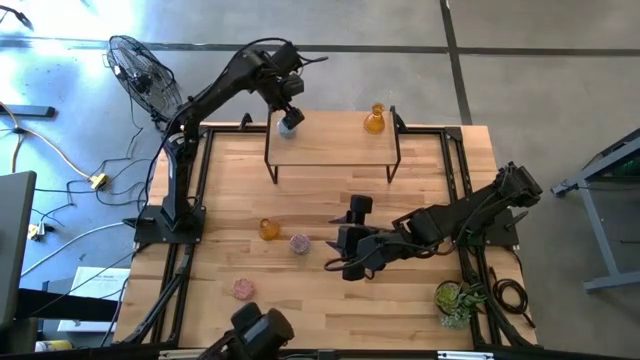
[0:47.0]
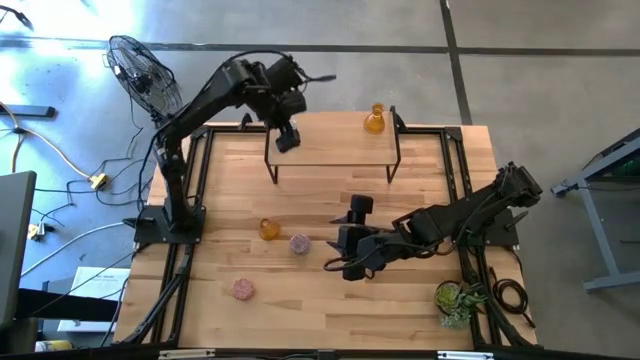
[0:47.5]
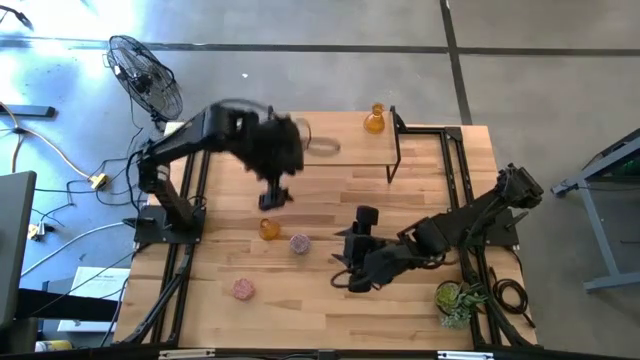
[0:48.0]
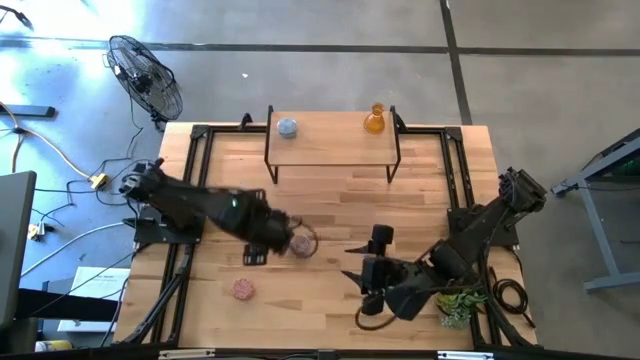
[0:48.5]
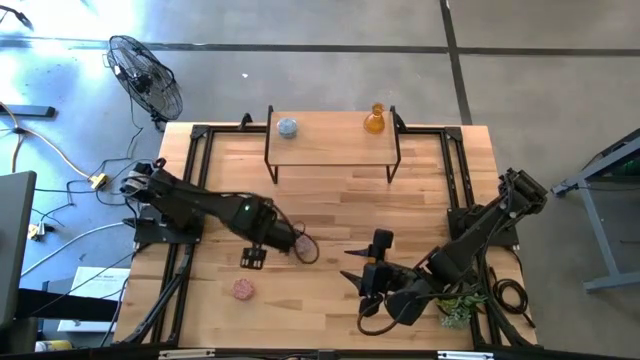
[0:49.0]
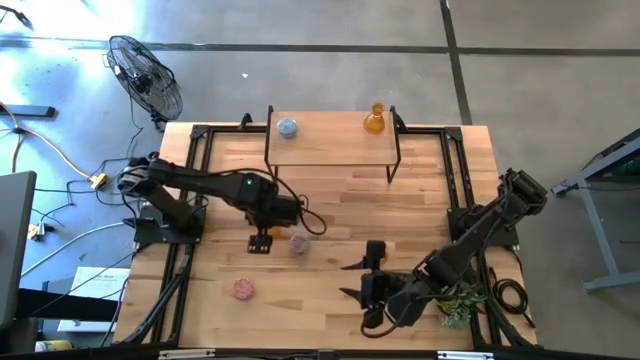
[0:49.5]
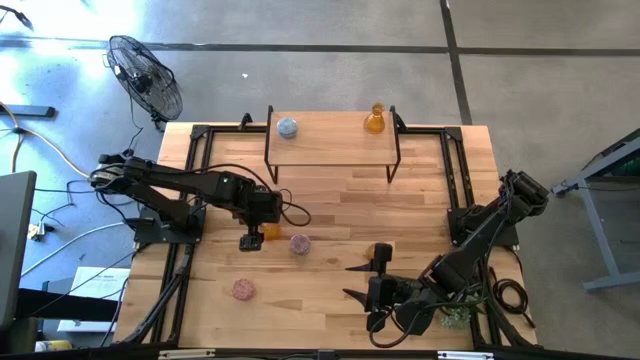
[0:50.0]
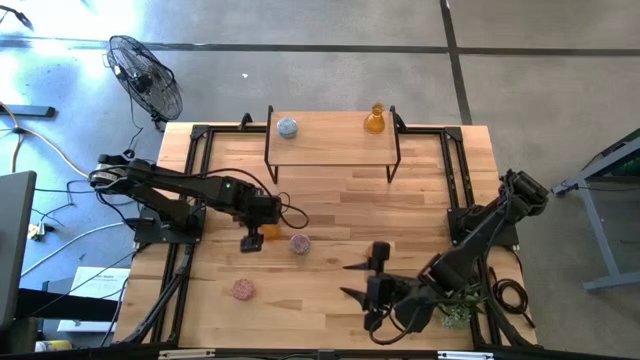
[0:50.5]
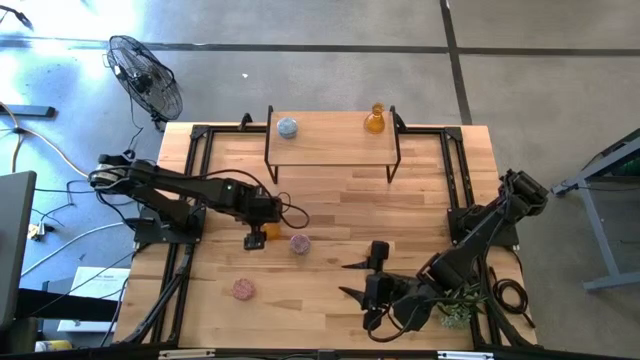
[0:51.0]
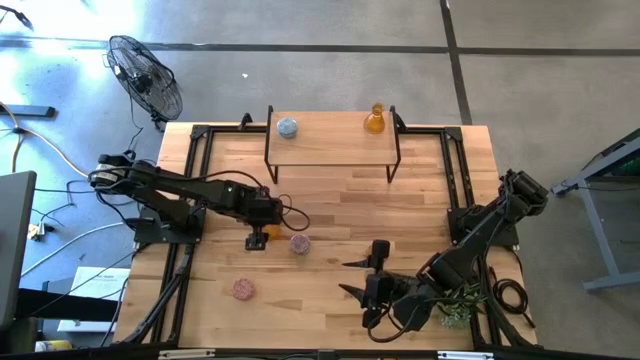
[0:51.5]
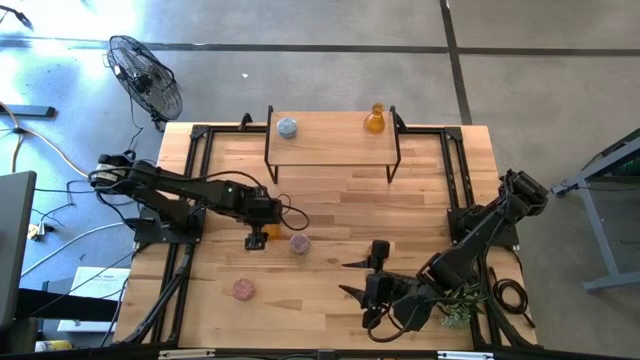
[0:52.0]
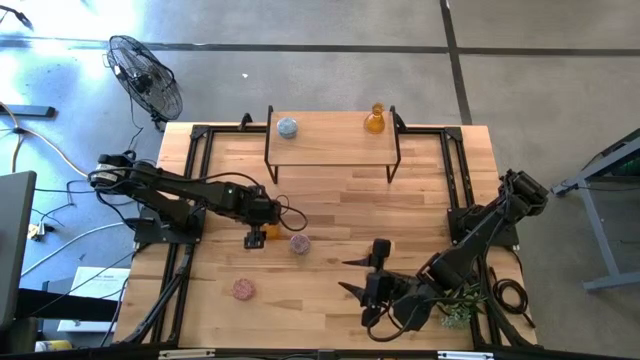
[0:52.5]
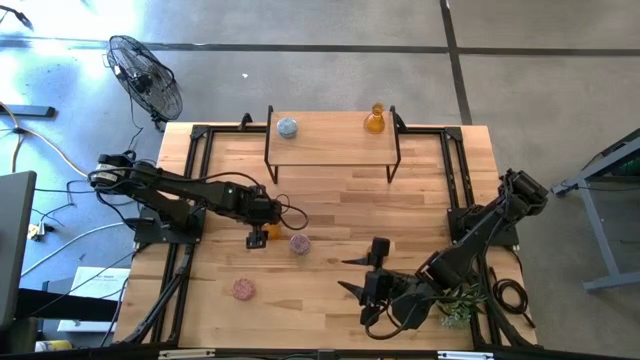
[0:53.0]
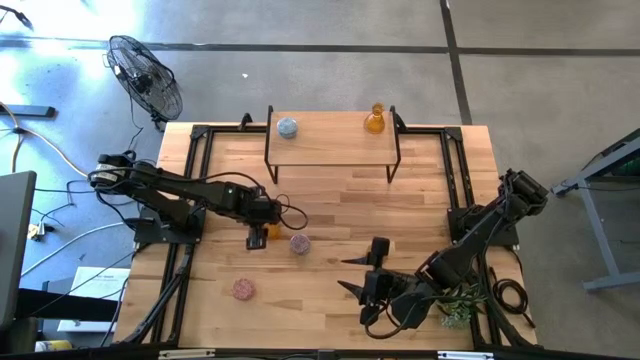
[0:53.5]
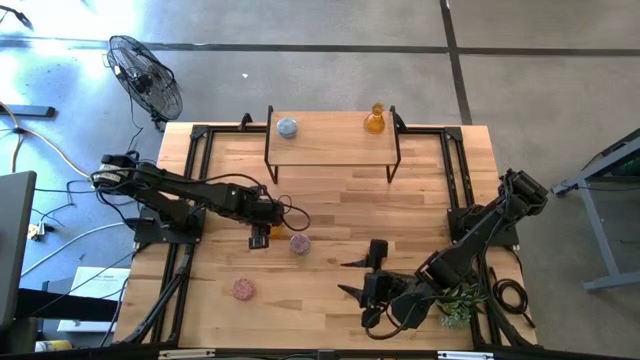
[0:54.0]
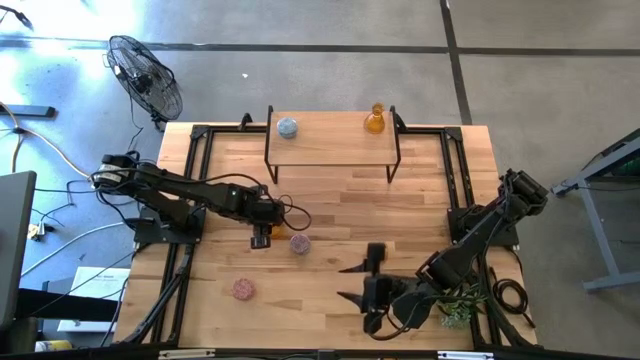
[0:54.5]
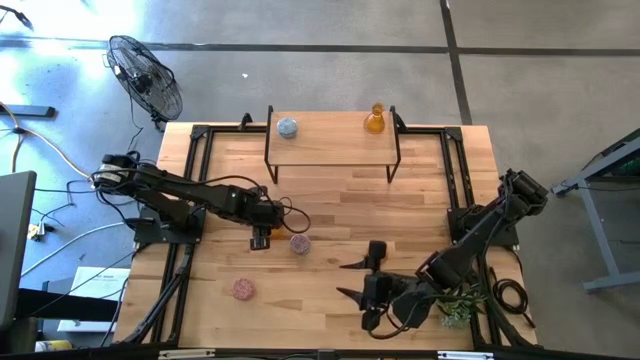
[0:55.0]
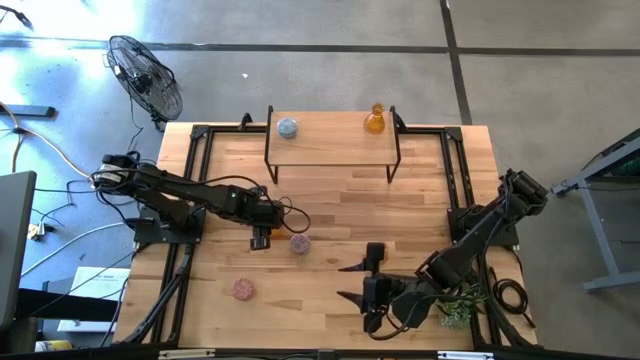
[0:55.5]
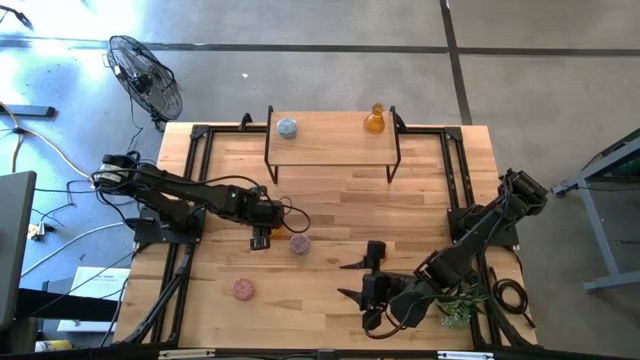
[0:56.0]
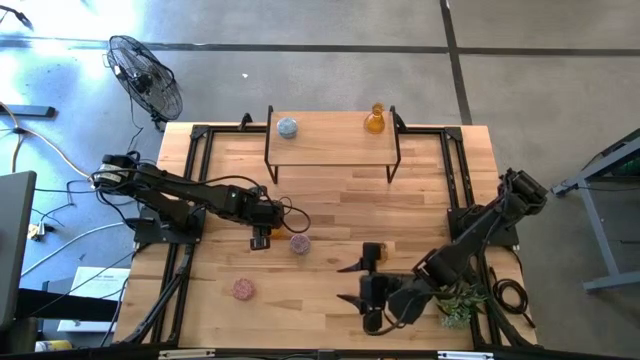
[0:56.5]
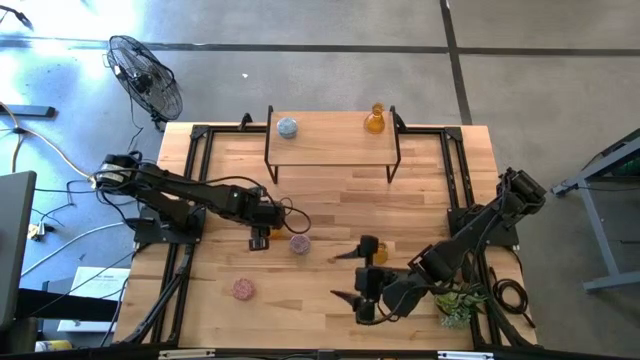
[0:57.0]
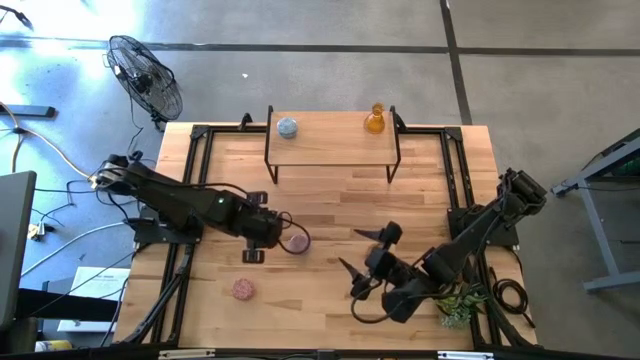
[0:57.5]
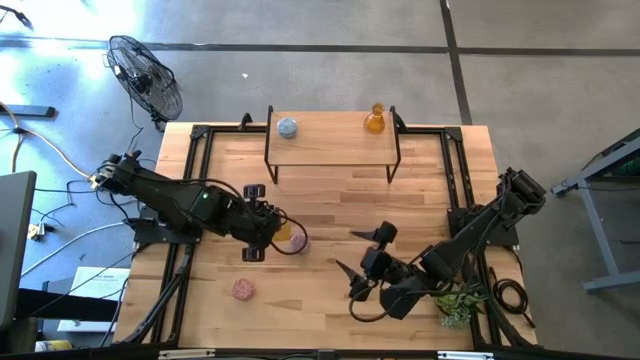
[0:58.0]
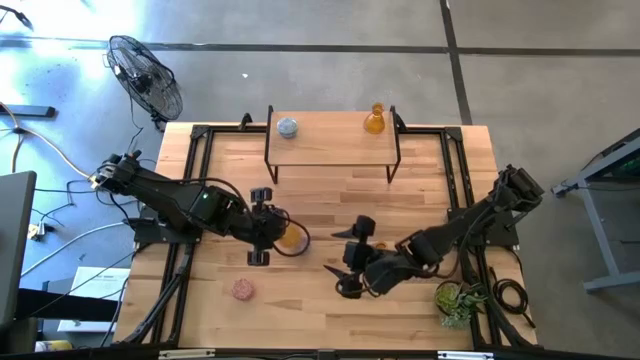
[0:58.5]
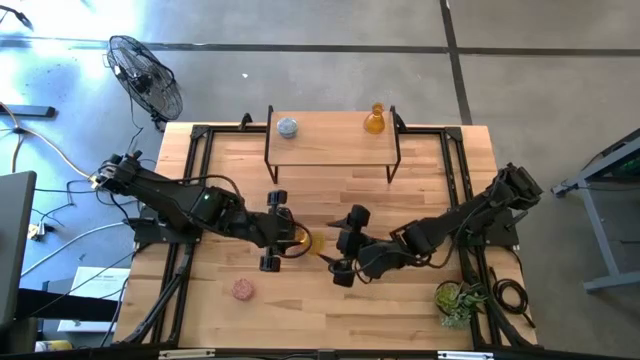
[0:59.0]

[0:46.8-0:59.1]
Task: Pick & Place candle stick holders
Put the left orange candle holder on the shelf

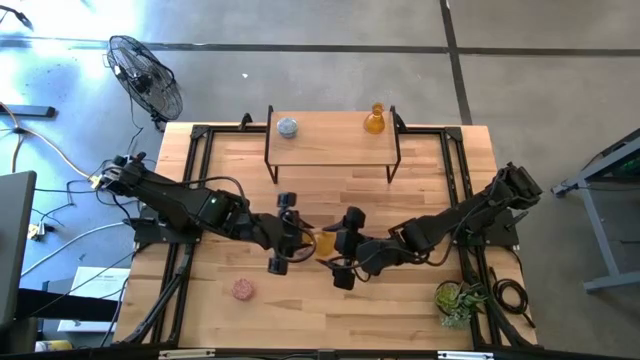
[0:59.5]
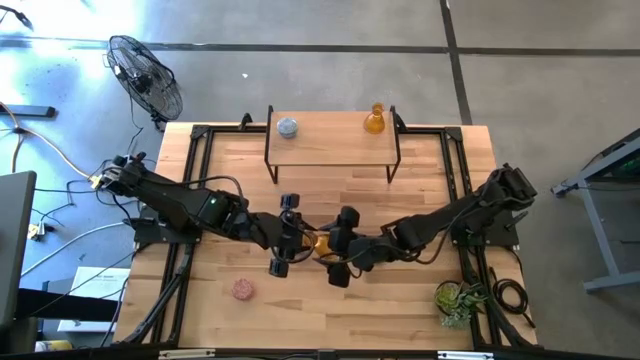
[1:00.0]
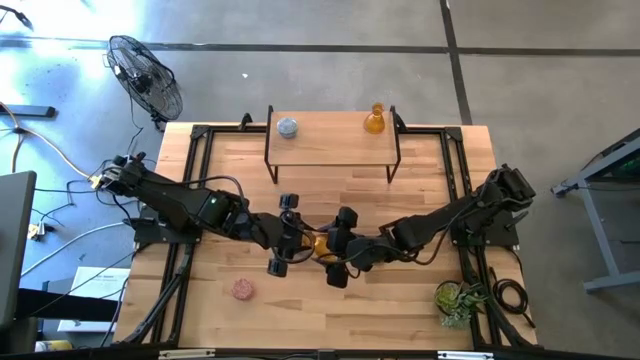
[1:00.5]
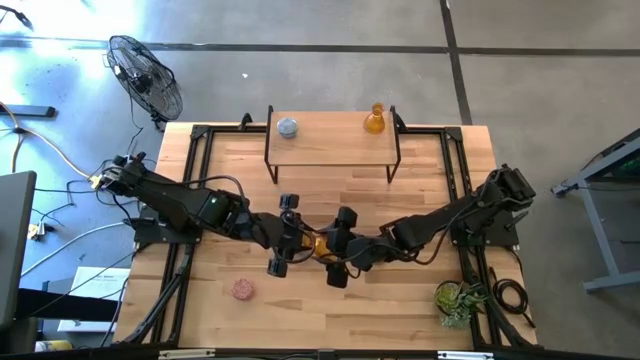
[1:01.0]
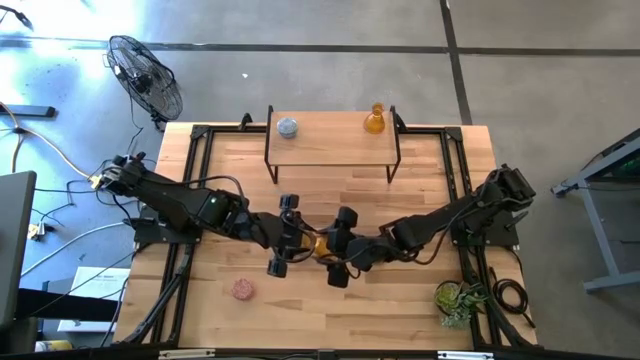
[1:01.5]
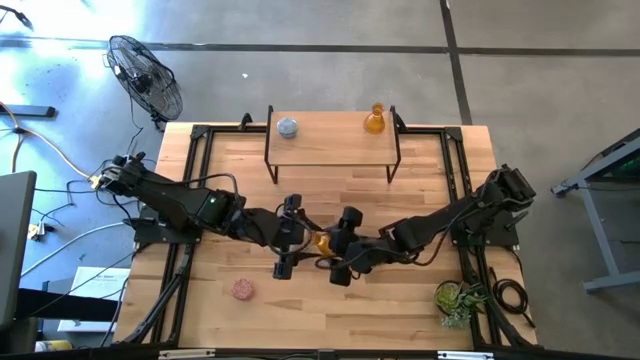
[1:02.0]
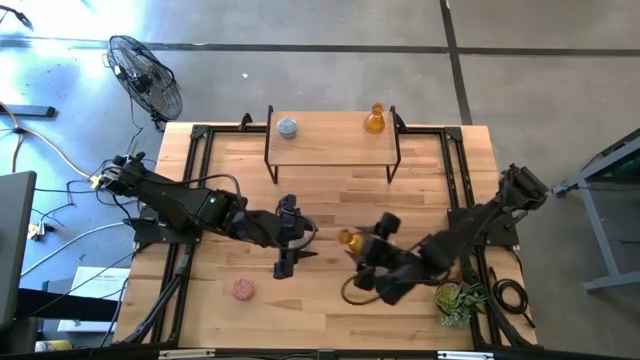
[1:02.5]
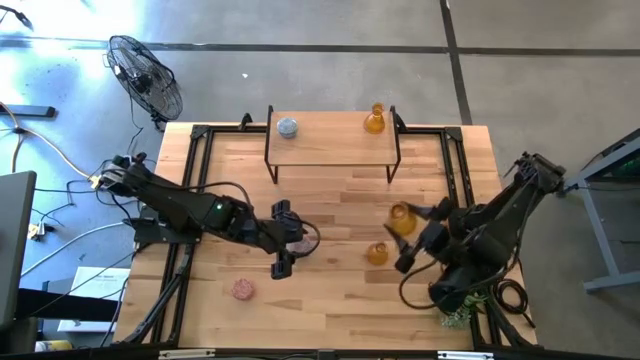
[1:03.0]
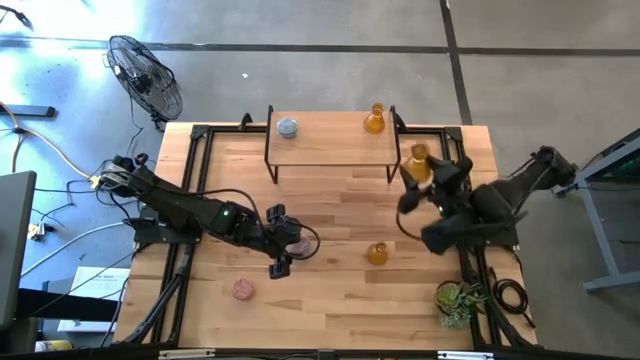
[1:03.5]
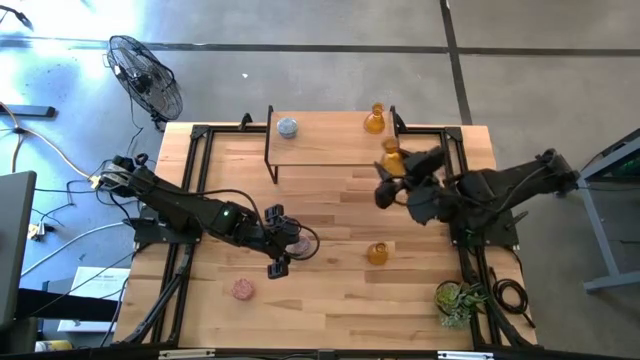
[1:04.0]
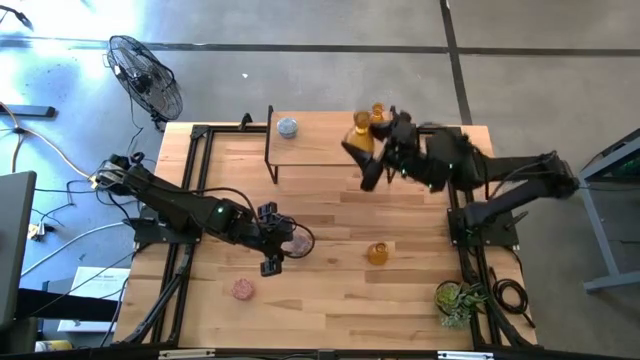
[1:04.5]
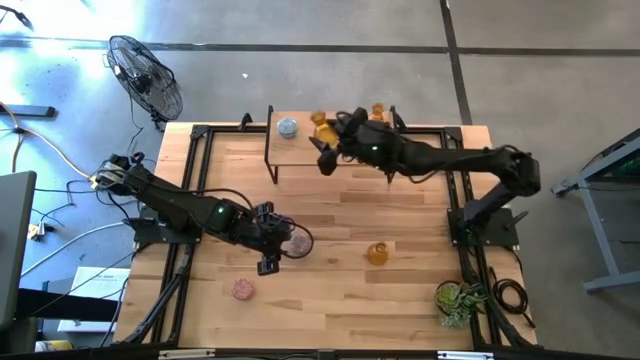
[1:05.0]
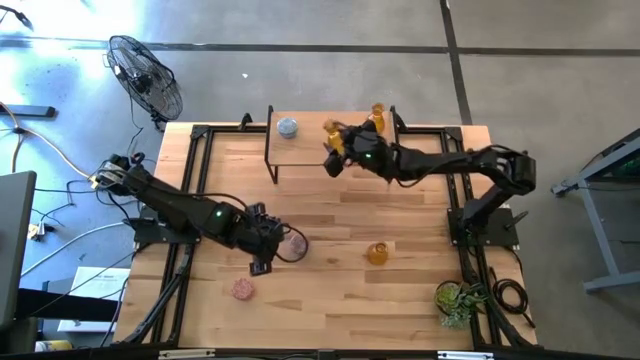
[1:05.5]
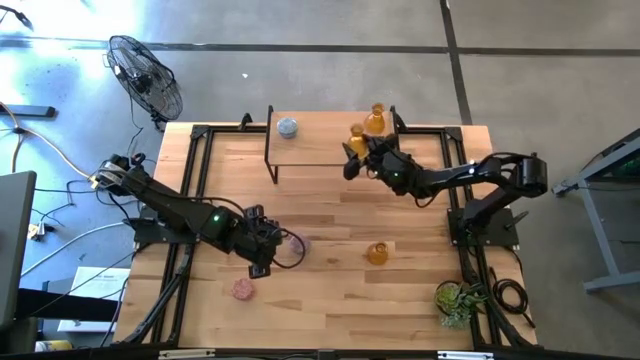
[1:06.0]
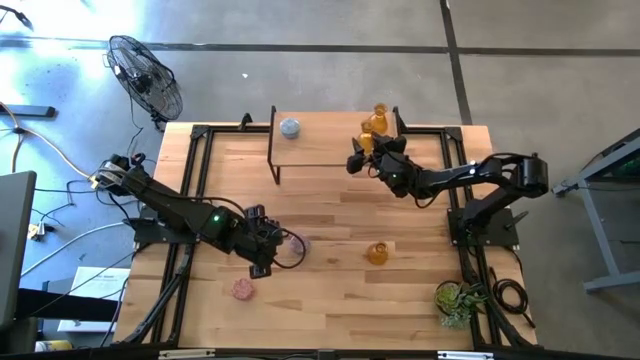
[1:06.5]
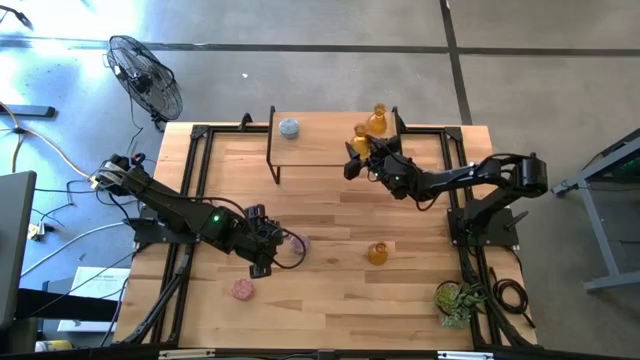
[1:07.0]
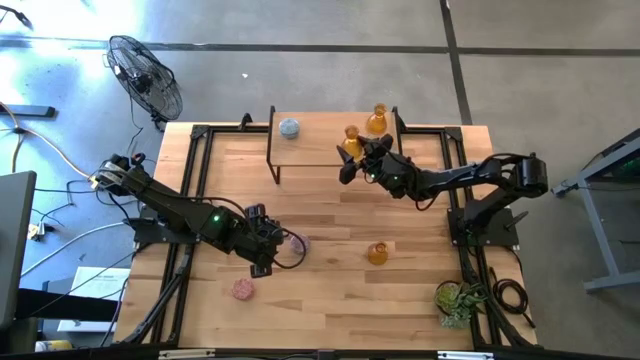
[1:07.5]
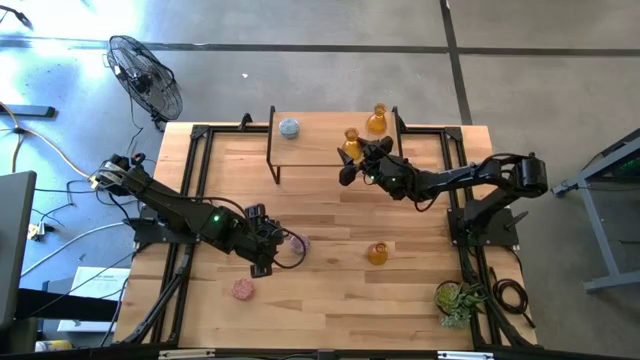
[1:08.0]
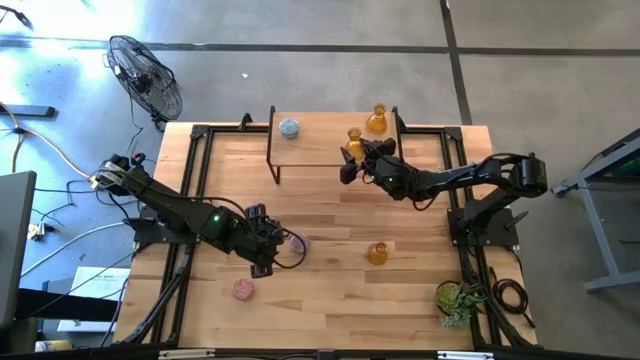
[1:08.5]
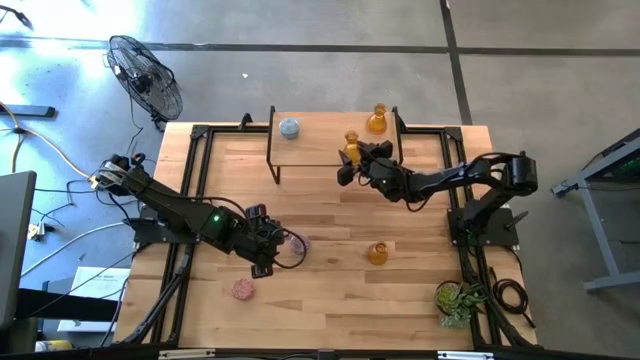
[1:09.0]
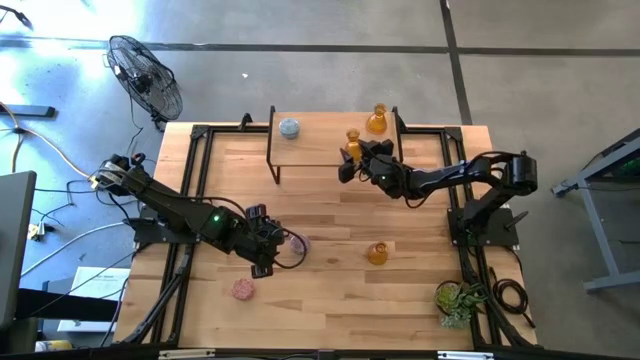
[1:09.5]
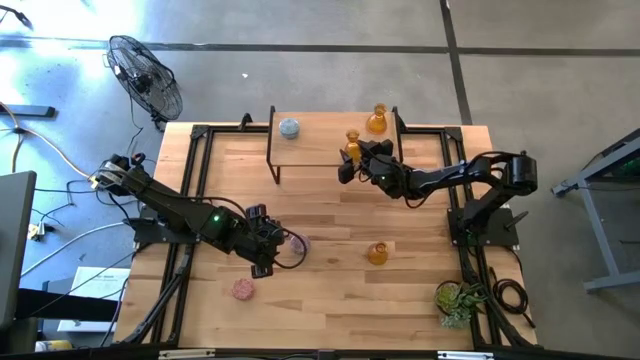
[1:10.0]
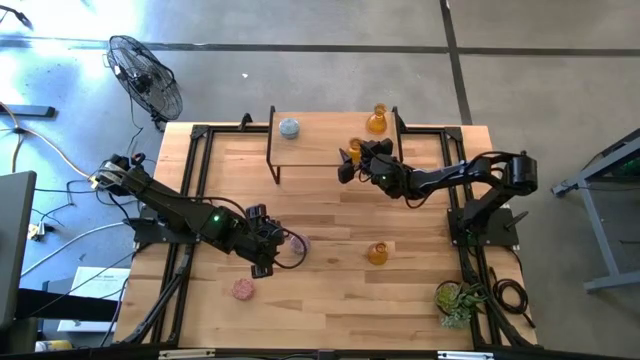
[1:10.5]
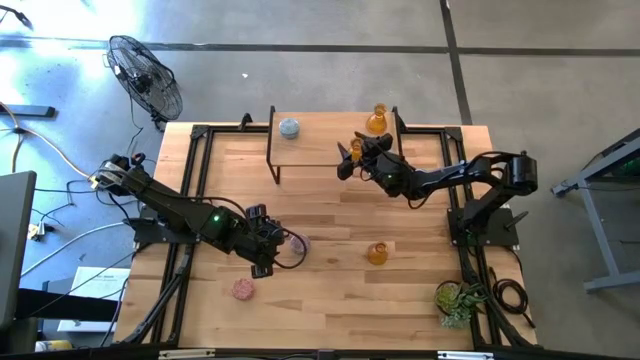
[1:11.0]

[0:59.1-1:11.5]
Put the left orange candle holder on the shelf
